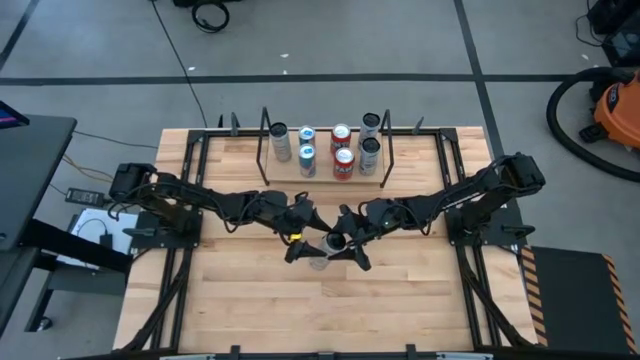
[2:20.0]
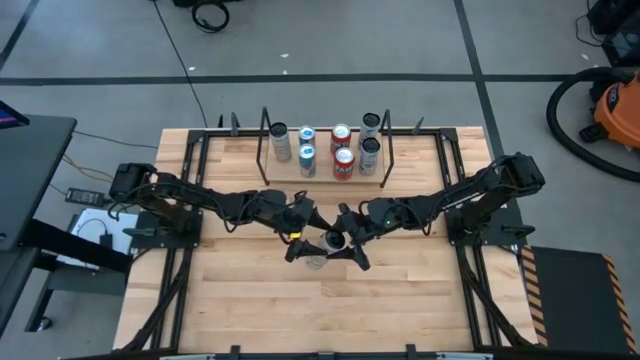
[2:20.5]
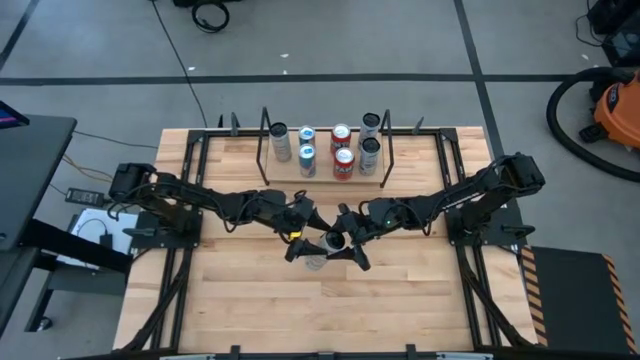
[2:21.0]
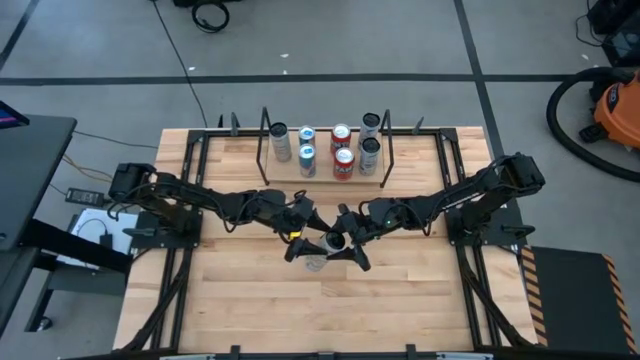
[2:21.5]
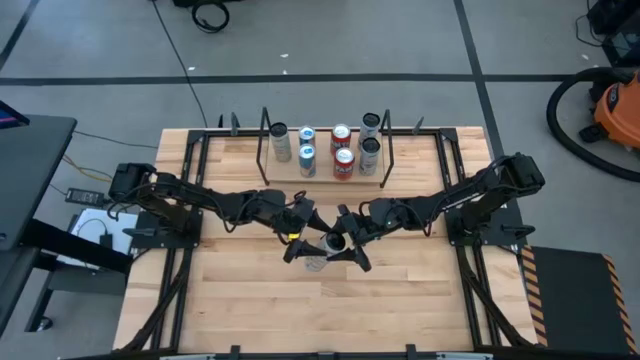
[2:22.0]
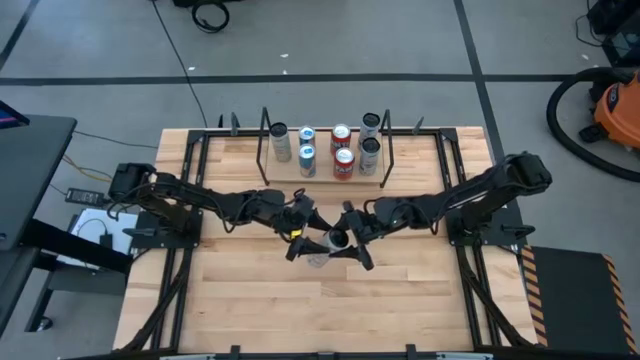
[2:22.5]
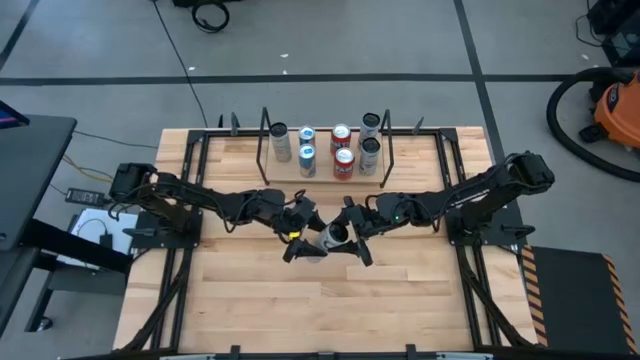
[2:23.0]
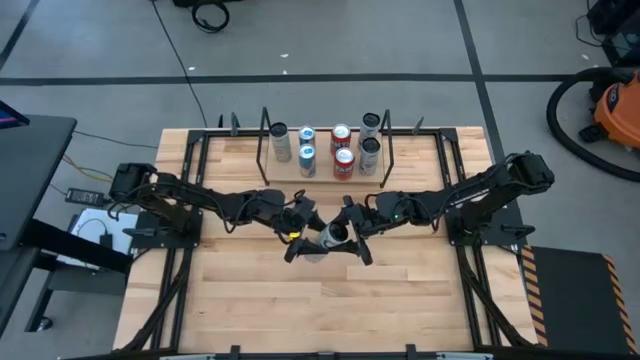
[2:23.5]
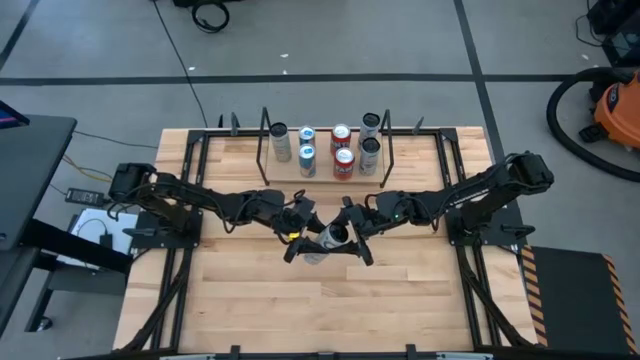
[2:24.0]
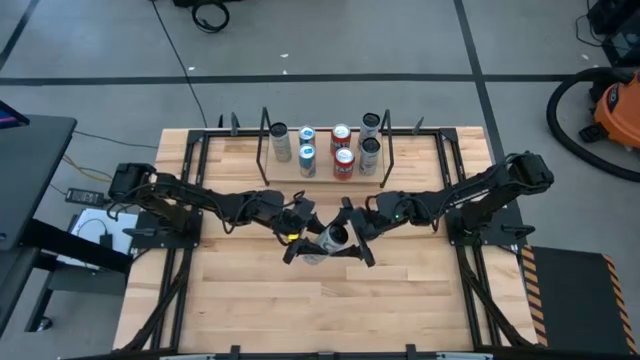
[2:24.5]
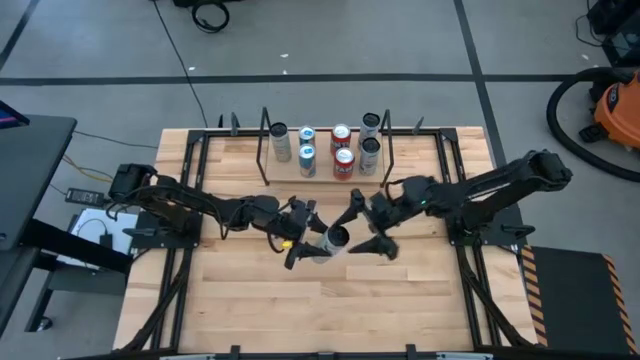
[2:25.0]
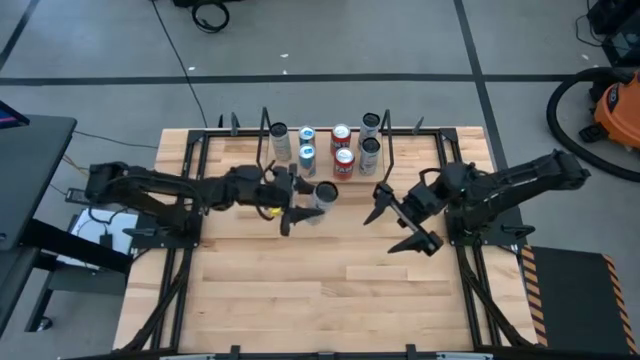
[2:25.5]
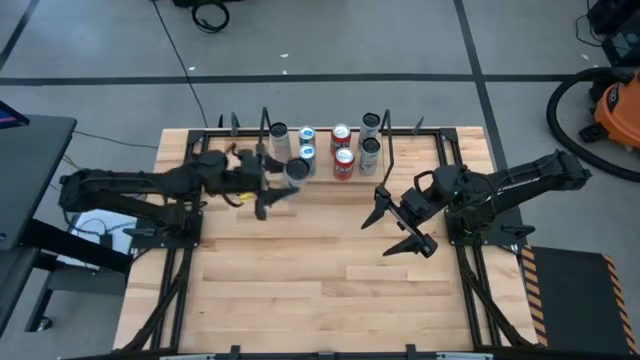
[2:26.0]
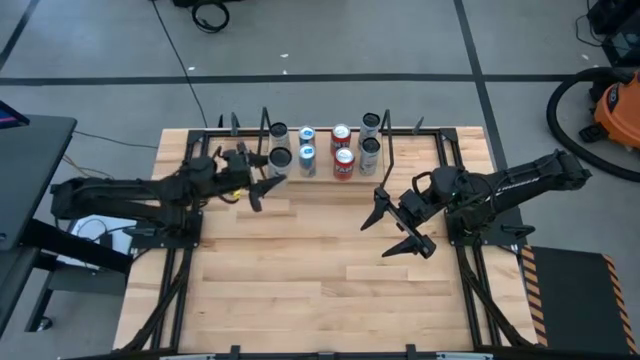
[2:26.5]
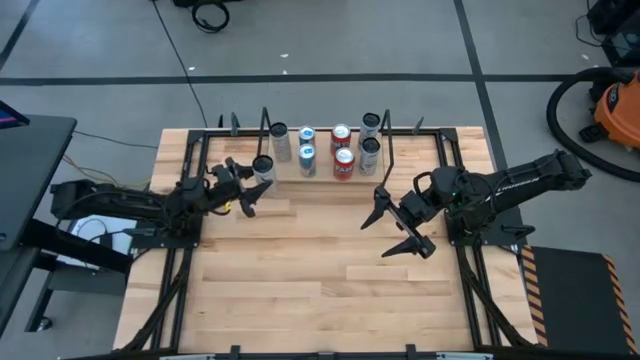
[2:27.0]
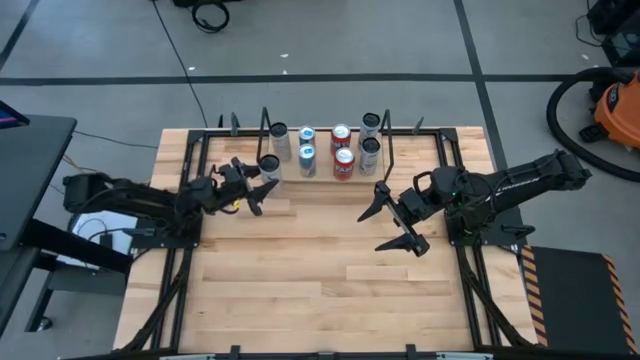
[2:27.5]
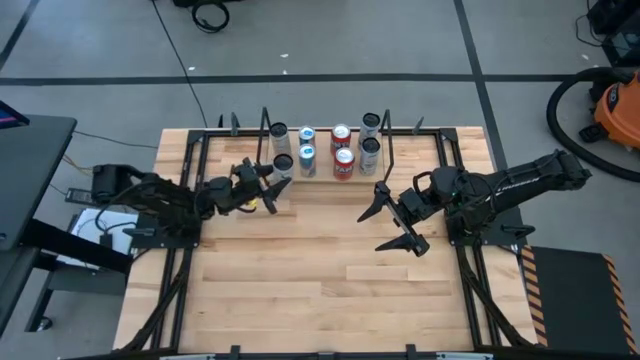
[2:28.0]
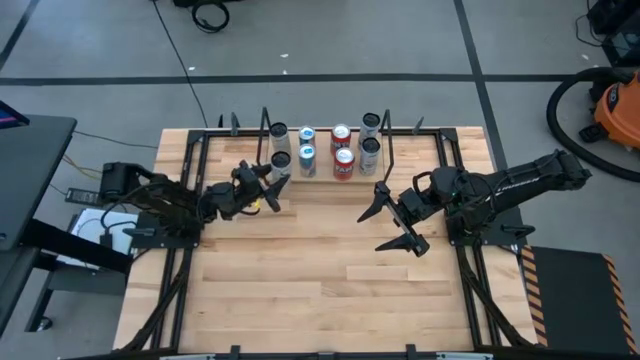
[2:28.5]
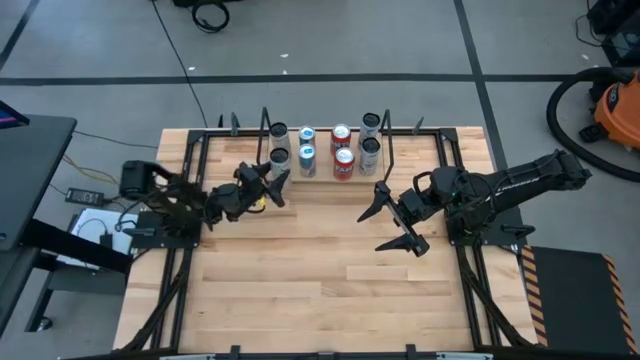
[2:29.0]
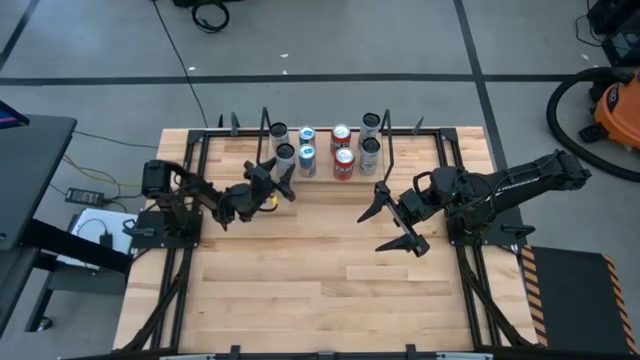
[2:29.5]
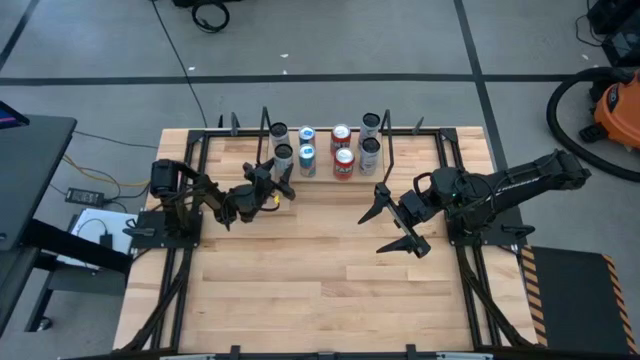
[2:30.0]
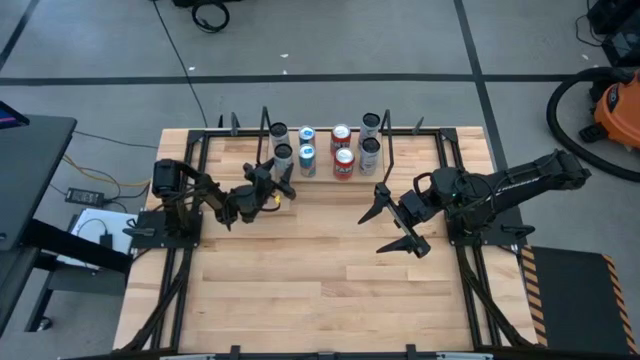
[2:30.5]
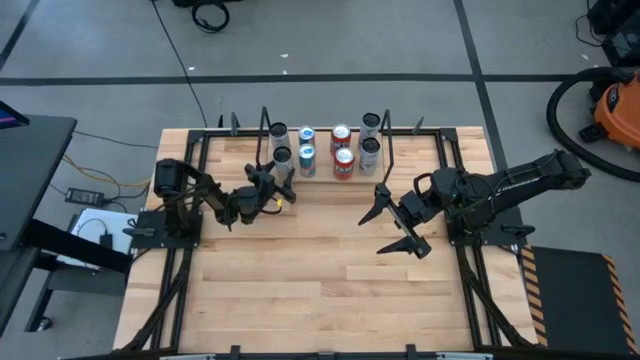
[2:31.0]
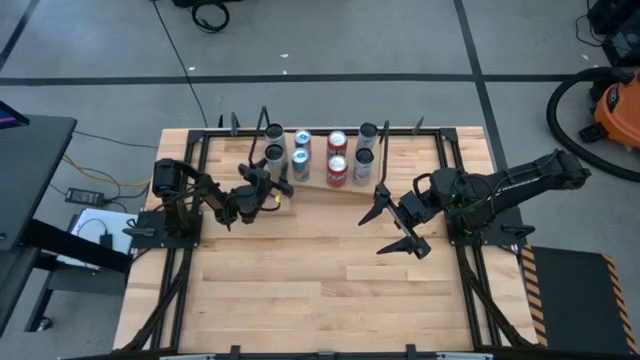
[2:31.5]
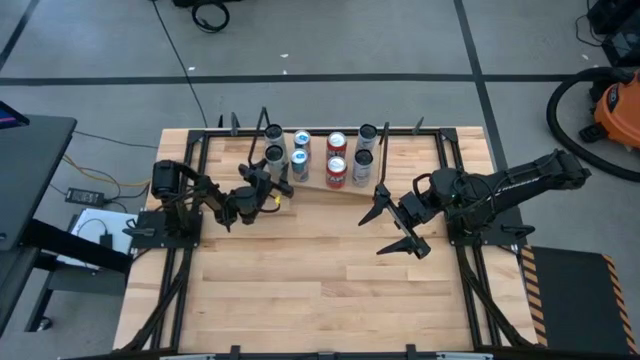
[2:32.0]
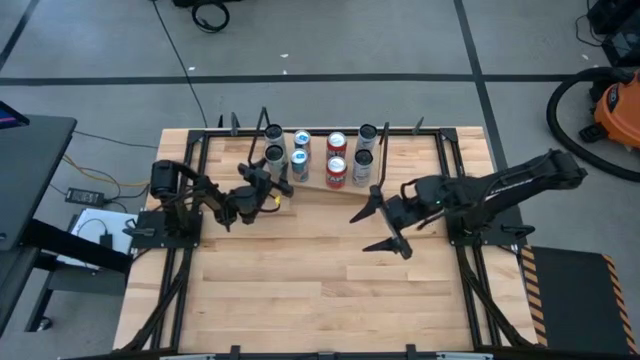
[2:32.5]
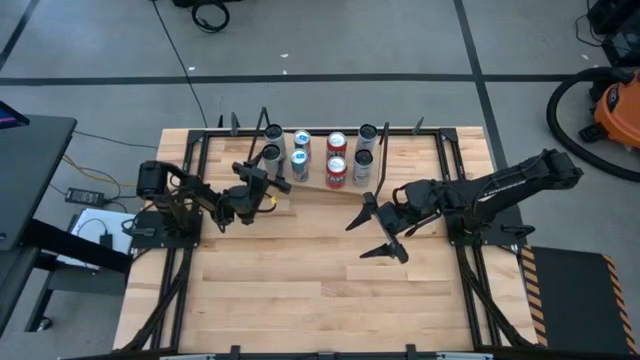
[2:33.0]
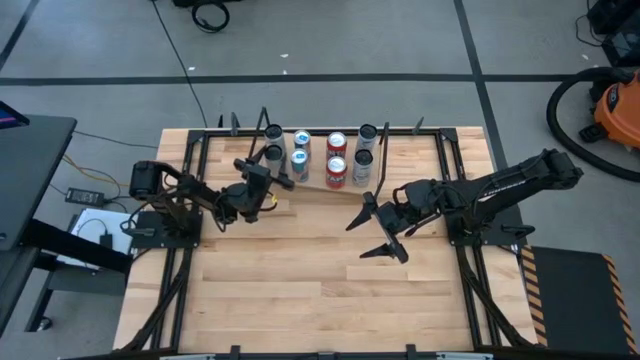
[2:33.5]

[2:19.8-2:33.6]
Task: Place canned beverage on shelf
Put the white yellow soda can on the shelf aligned with the other white yellow soda can

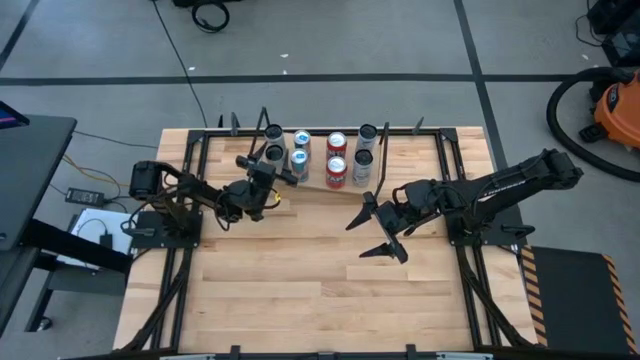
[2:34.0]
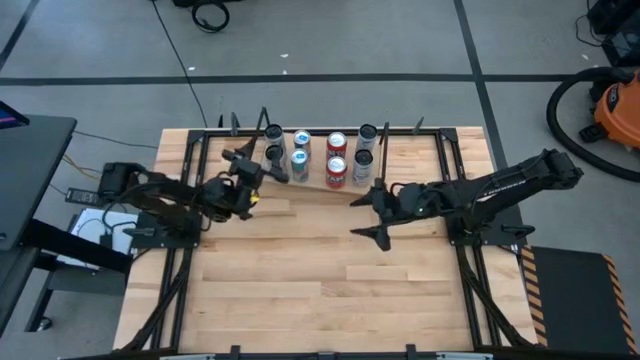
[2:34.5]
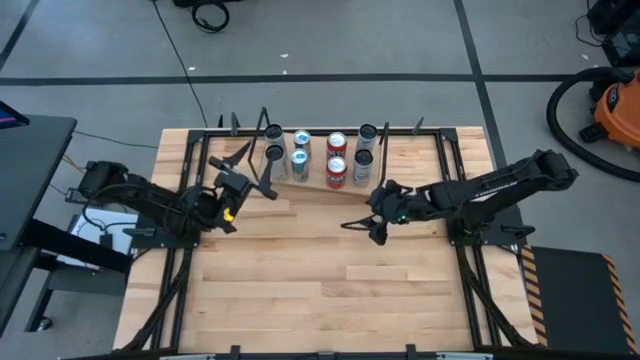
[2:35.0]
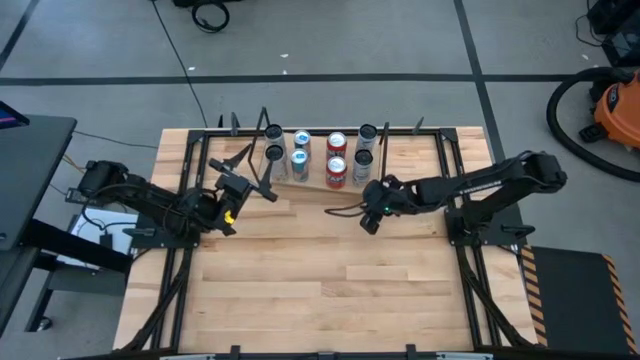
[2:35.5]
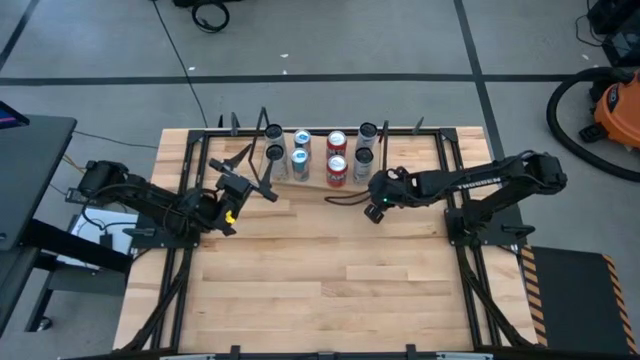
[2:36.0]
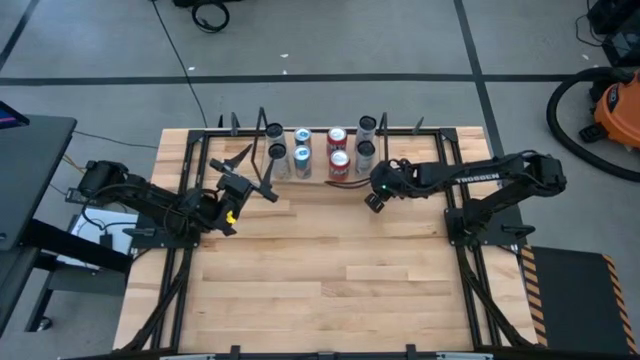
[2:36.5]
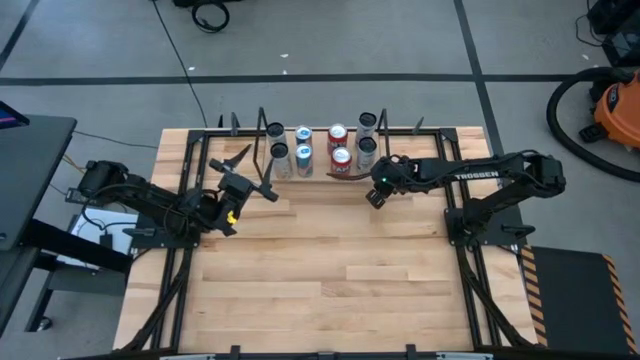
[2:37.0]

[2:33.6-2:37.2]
Adjust the shelf on the table

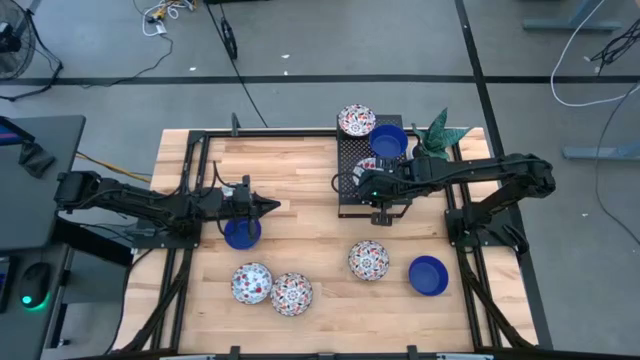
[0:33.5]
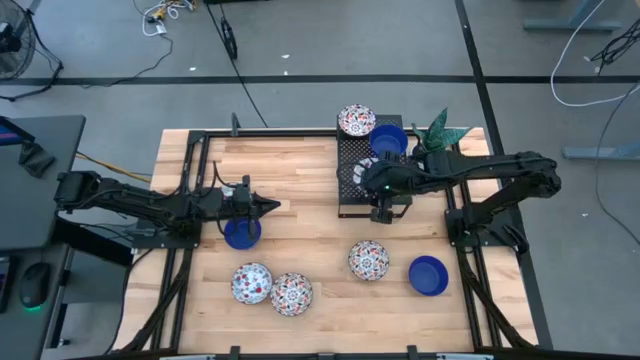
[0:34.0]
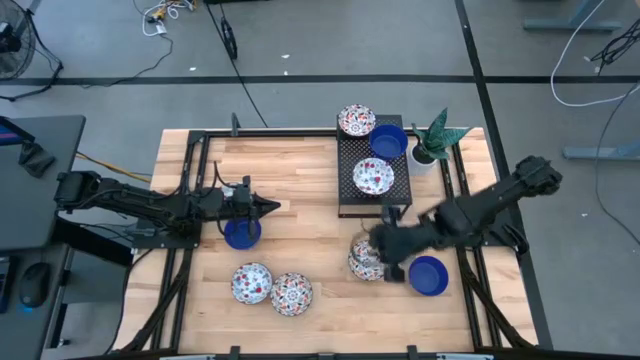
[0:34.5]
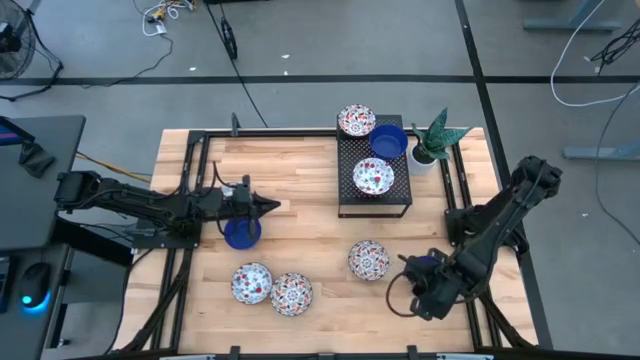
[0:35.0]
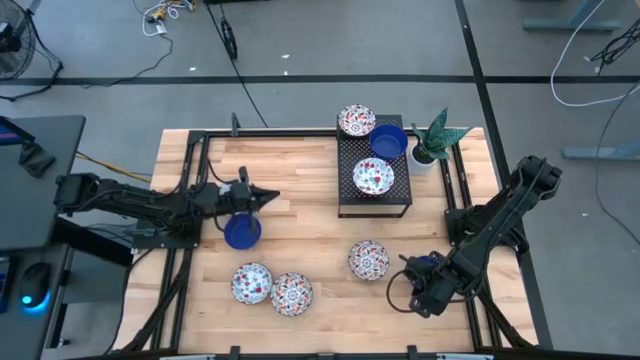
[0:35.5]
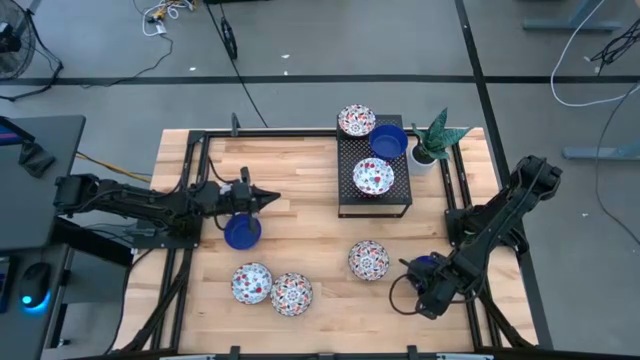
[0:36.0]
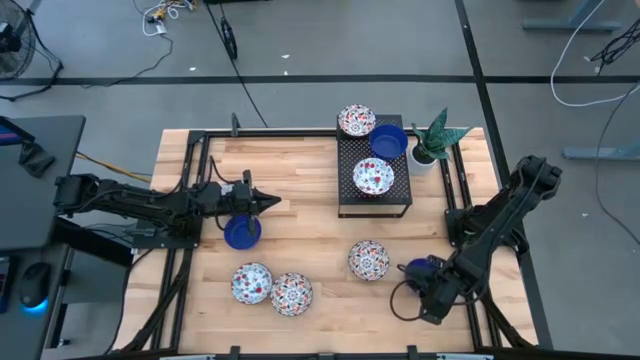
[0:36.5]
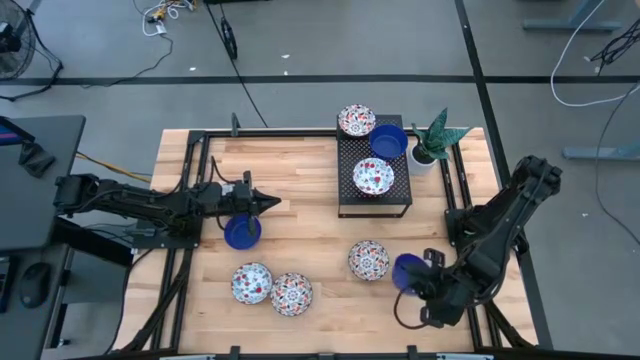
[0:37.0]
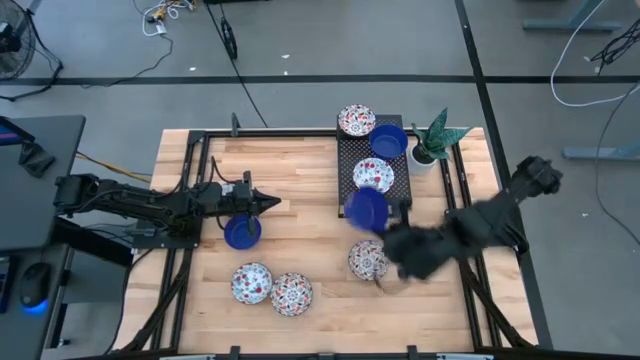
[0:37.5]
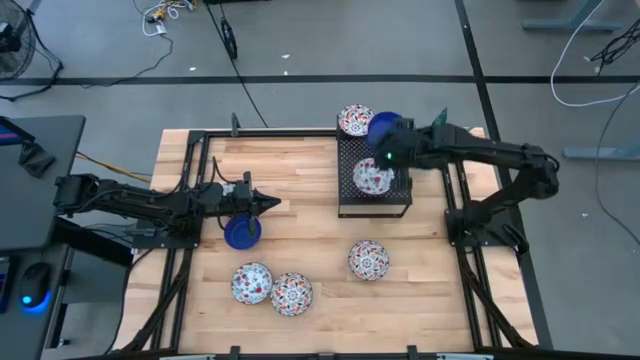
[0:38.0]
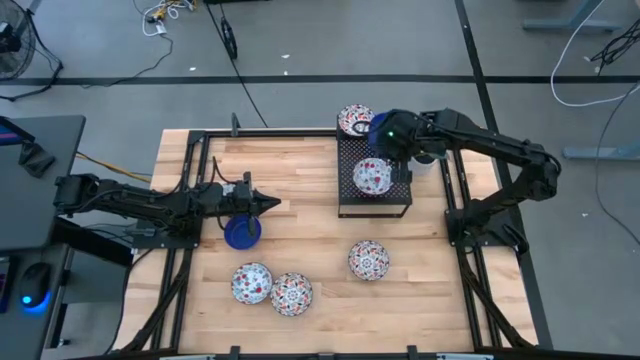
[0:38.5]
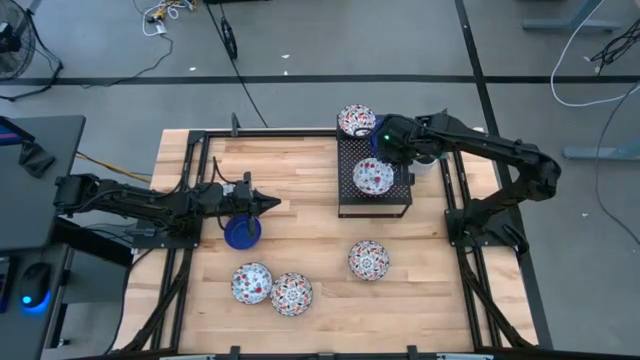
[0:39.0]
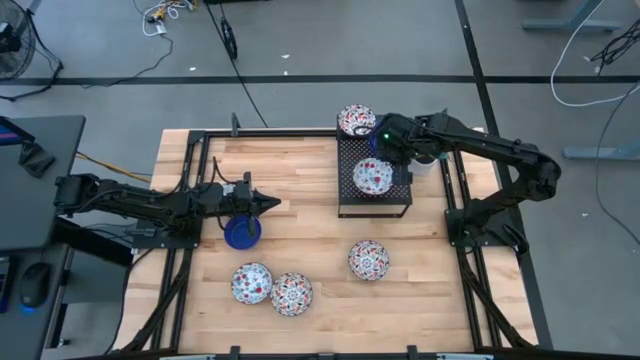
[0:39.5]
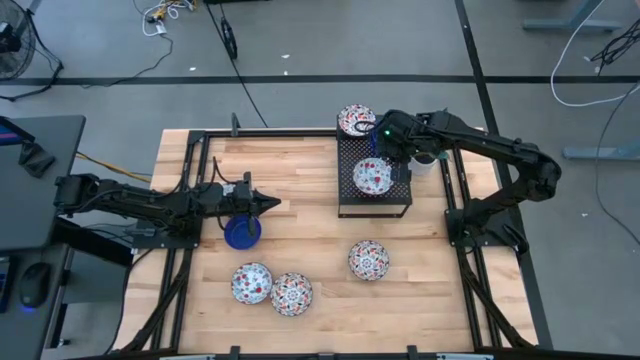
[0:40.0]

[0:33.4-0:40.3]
Task: Pick & Place Mini bowls
Stack the right blue bowl on top of the other blue bowl on the shelf
